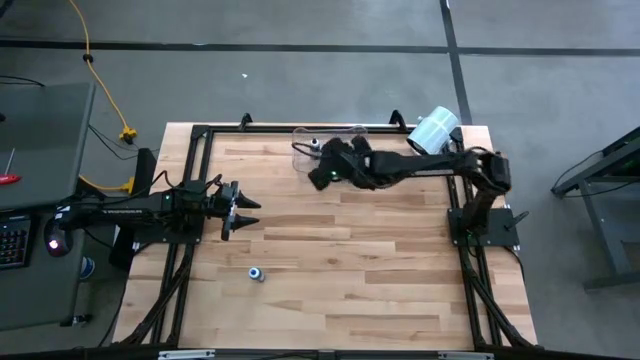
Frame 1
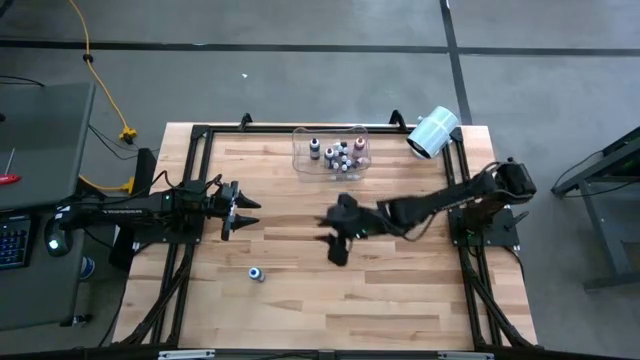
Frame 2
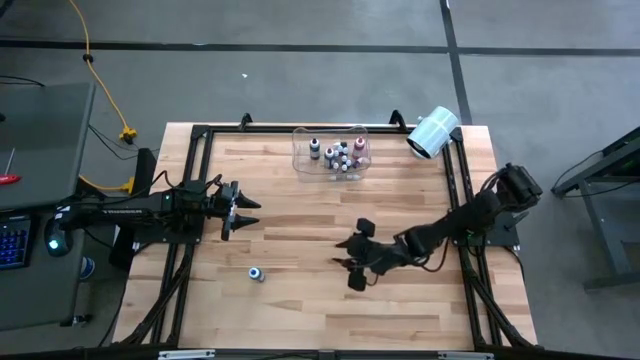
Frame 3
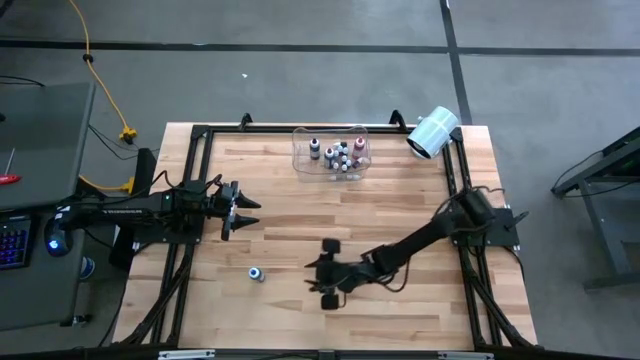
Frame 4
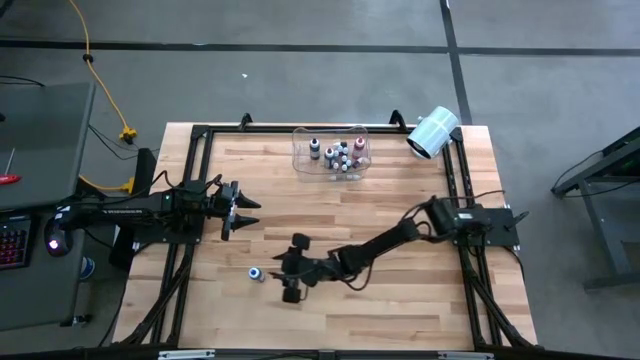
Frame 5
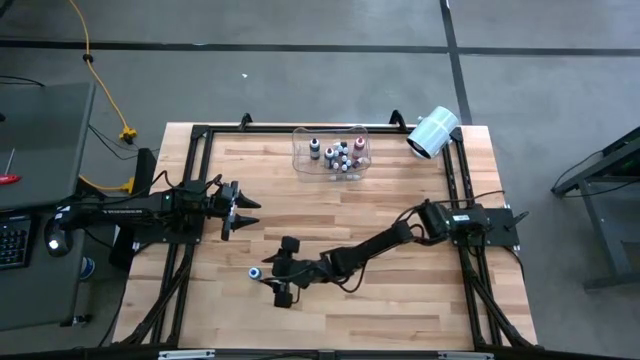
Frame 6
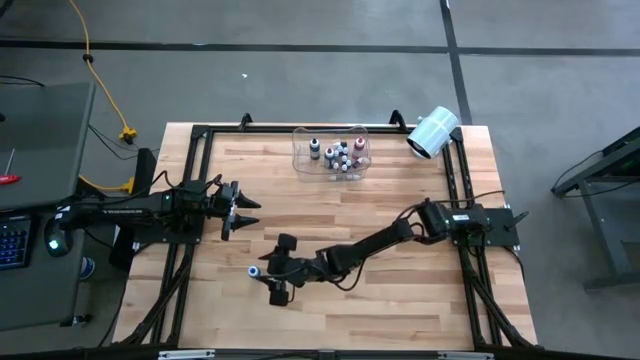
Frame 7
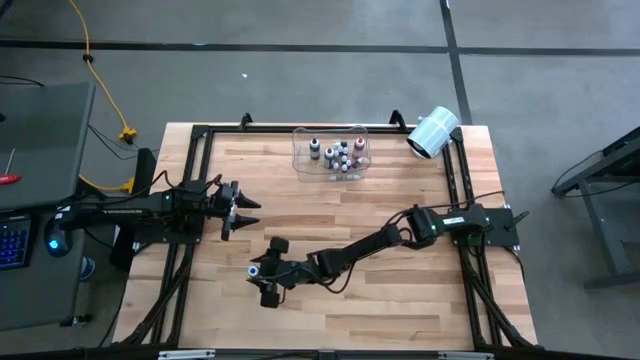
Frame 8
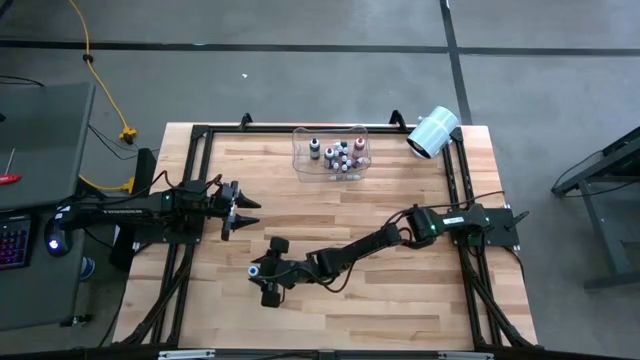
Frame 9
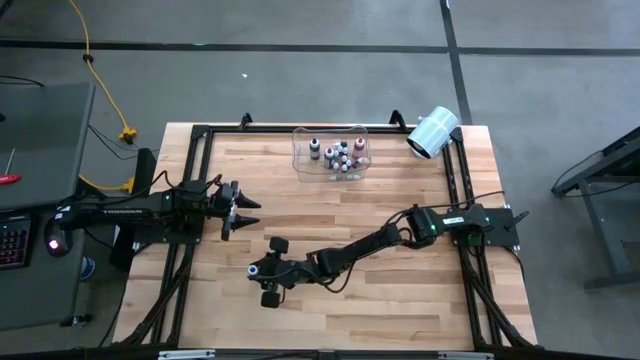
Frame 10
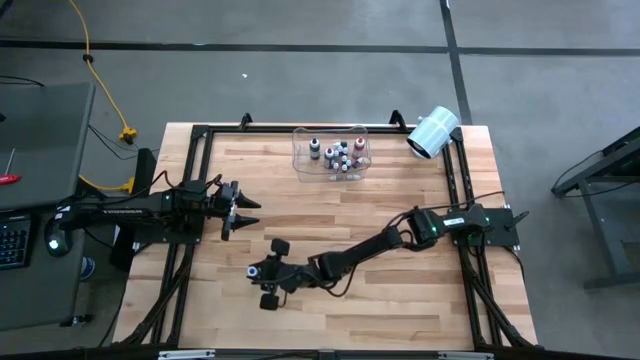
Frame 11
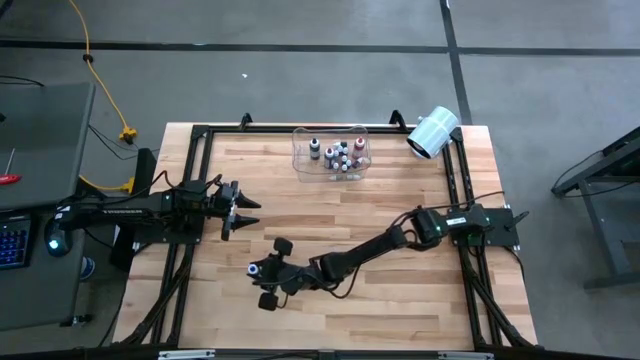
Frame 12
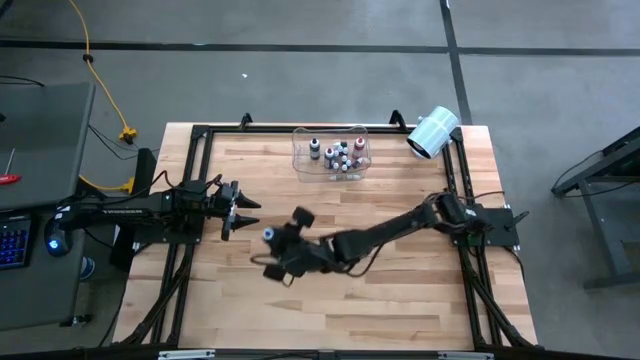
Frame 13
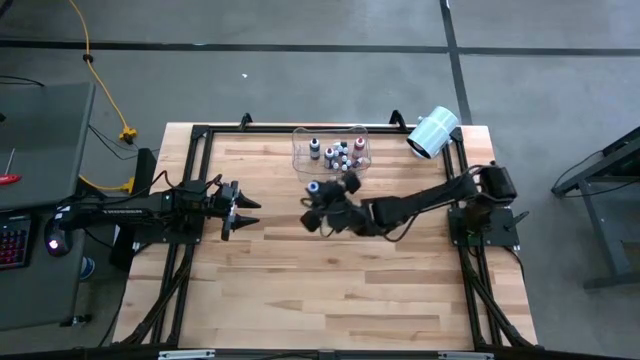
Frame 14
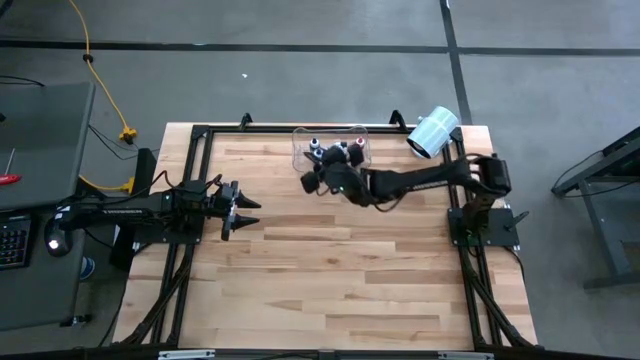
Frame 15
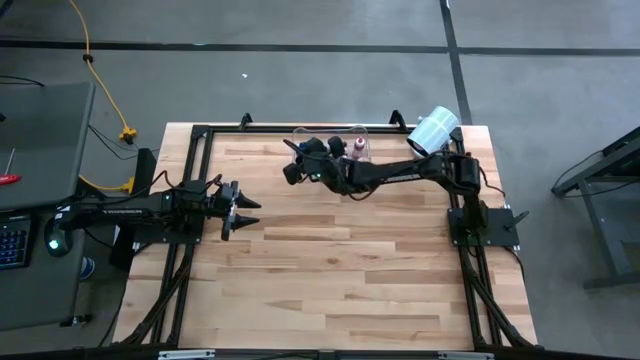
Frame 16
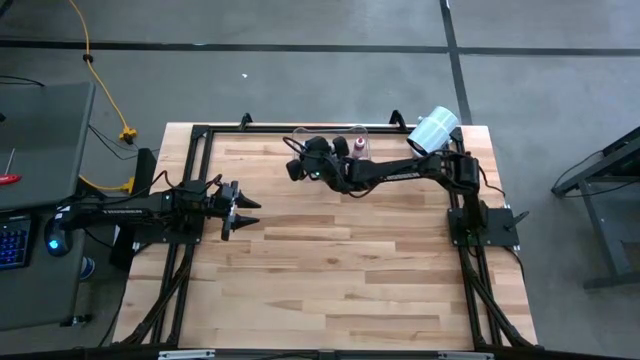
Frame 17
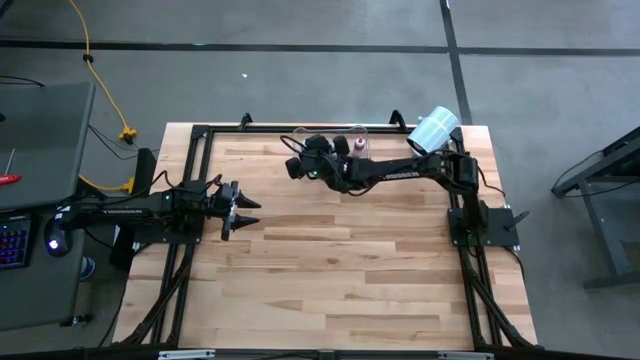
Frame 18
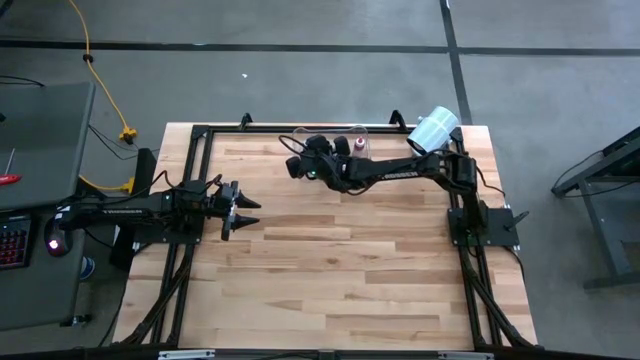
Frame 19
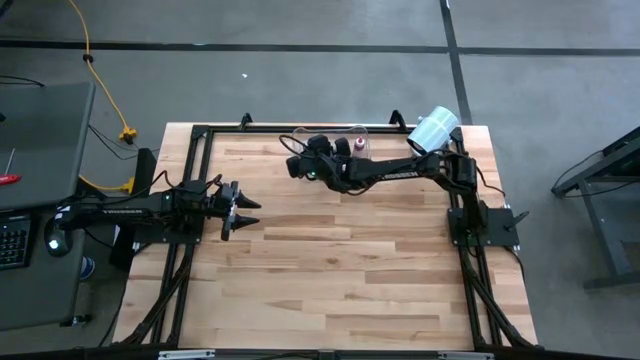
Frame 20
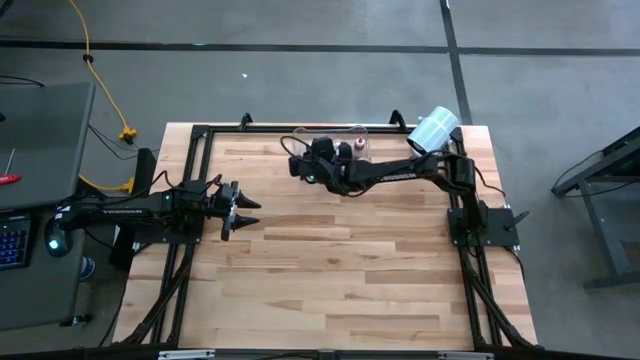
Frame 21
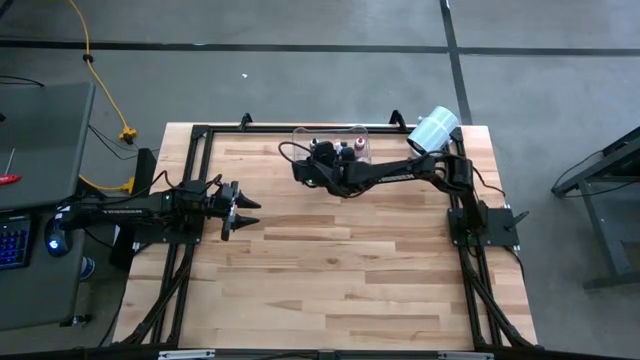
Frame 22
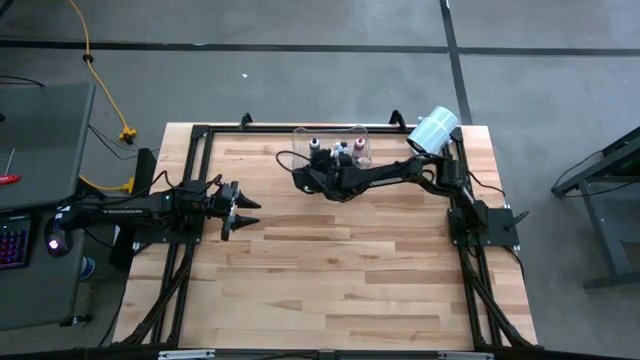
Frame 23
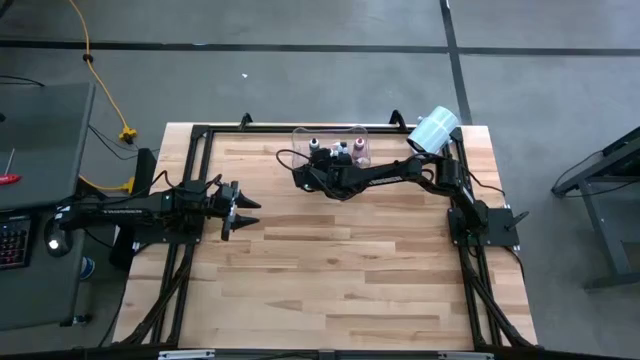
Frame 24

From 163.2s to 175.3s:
Task: Pick & Place food coloring
Put the large blue food coloring into the transparent container

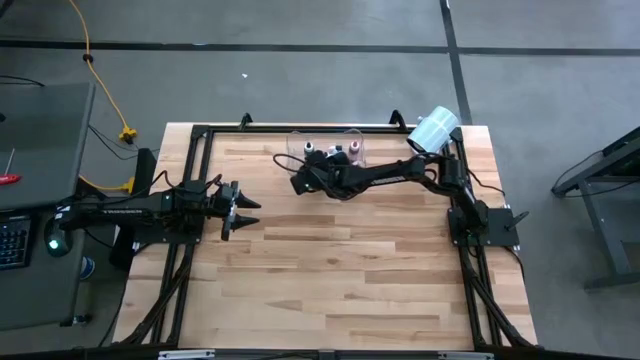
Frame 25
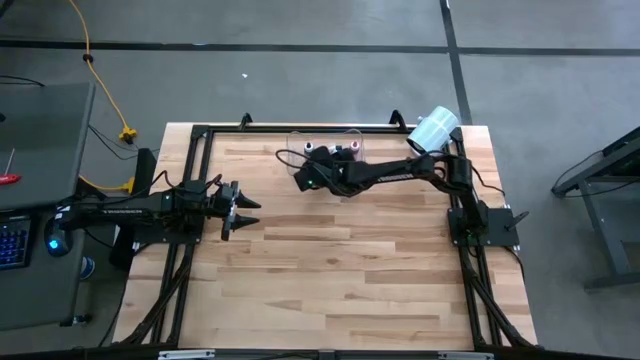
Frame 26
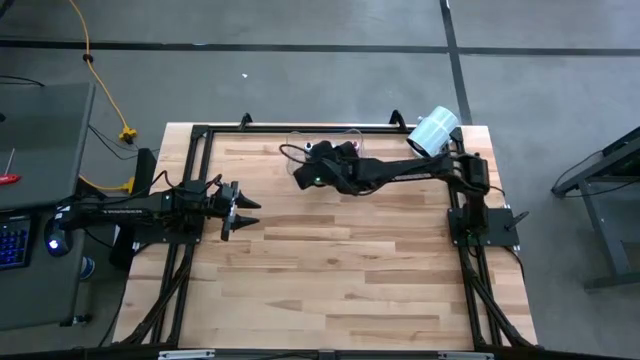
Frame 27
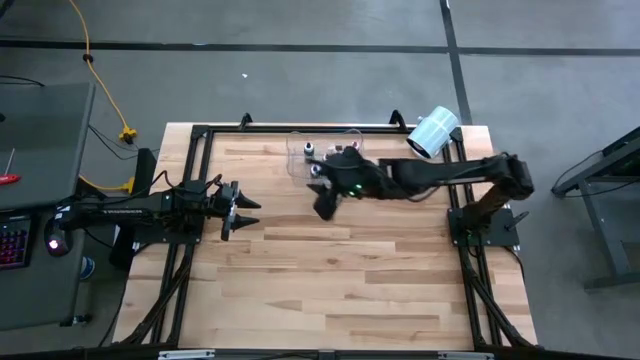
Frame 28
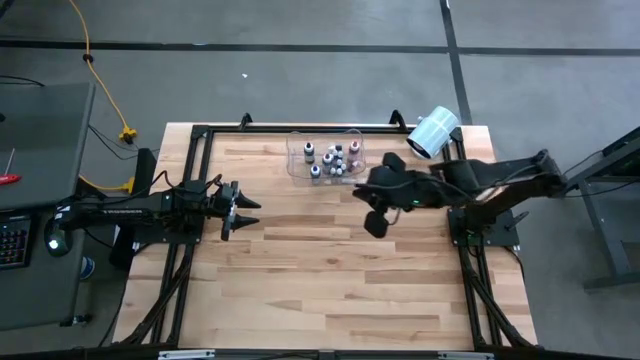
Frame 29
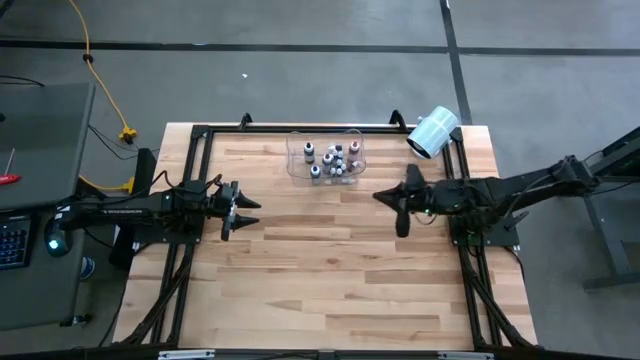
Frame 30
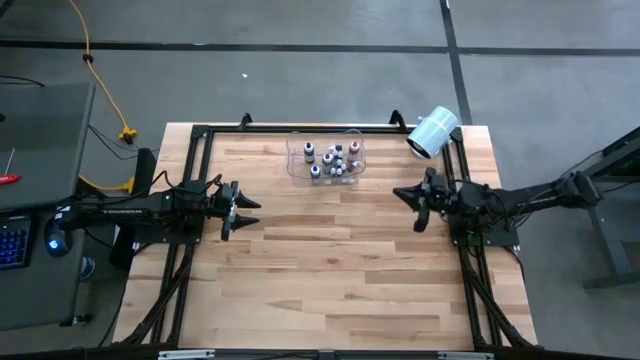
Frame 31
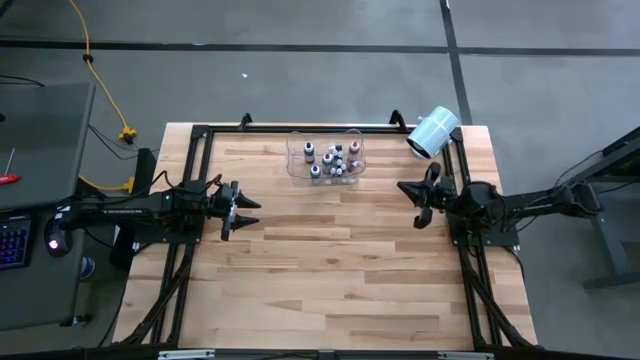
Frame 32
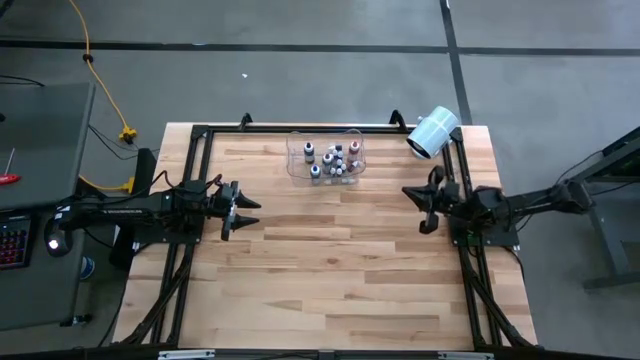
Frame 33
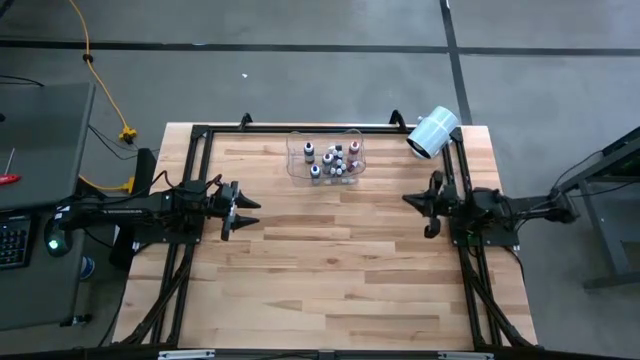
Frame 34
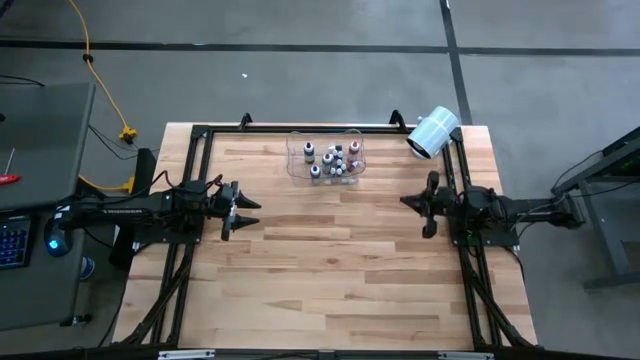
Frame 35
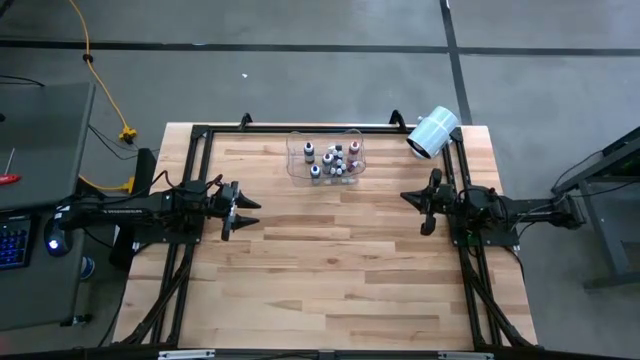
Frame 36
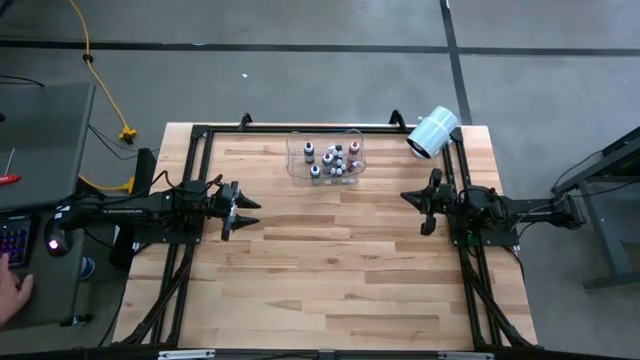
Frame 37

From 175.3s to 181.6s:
Return to Home Position

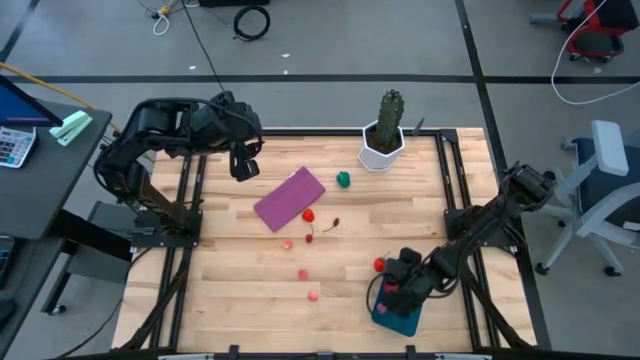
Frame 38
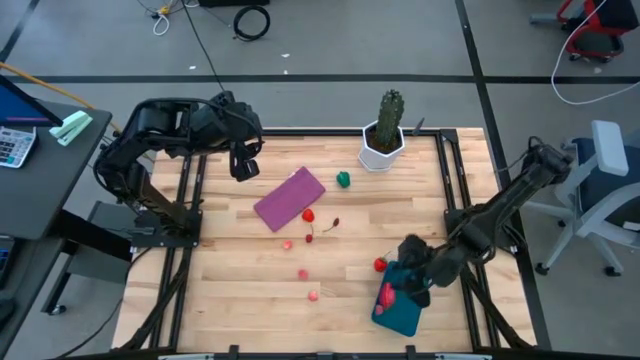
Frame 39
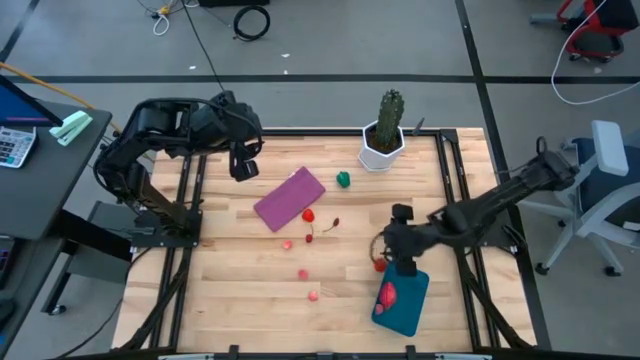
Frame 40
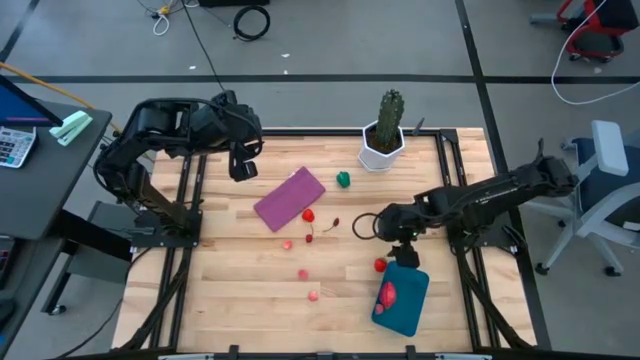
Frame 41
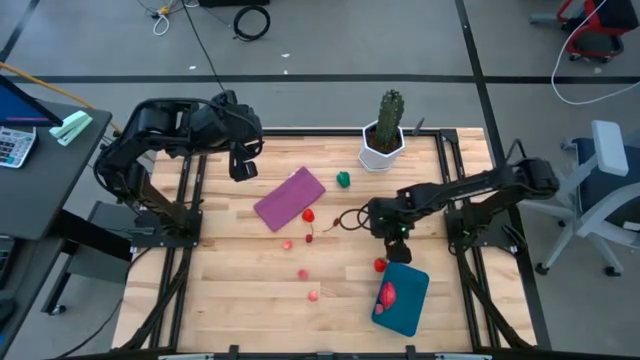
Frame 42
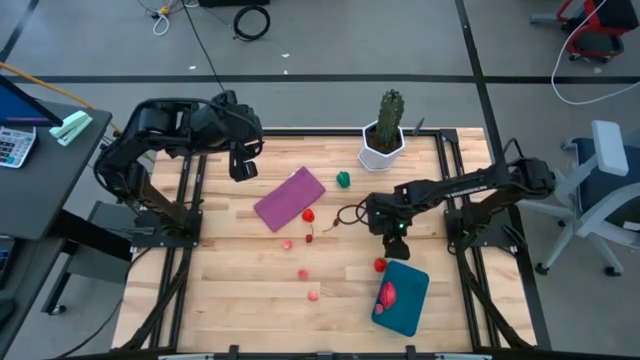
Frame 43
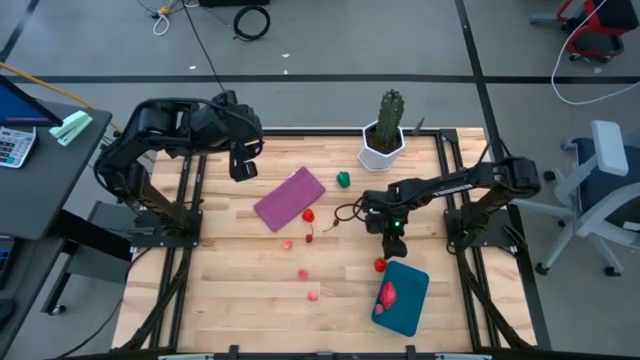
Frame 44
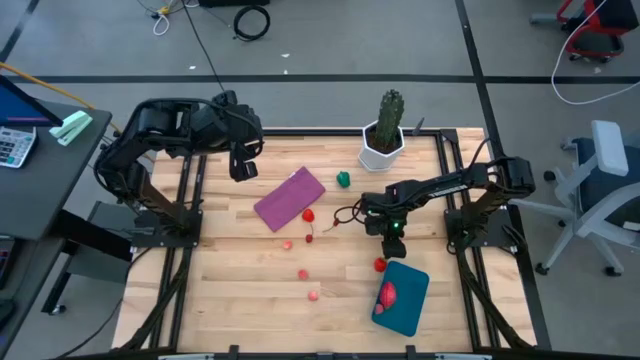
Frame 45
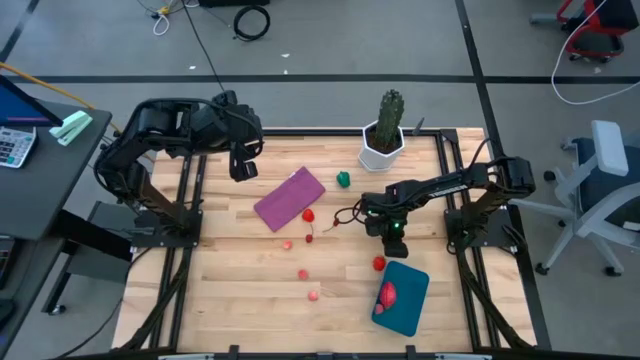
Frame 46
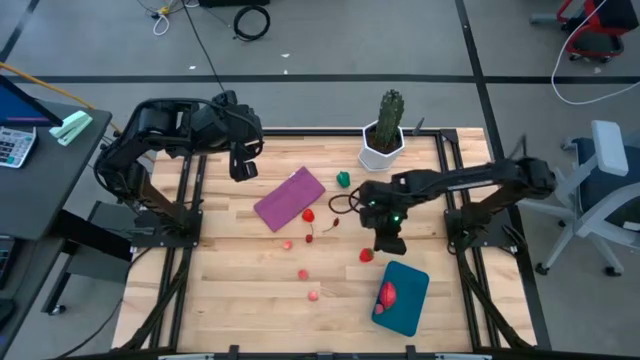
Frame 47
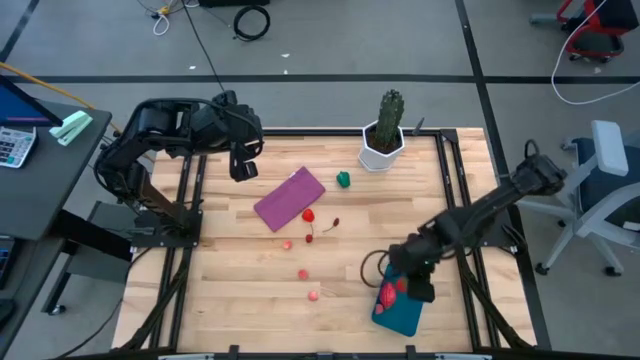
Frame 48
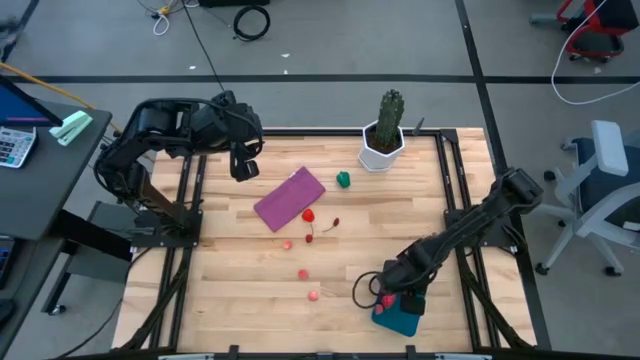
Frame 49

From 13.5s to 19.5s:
Task: Pick and placing Produce into tupperware
Put the strawberry into the blue bin
